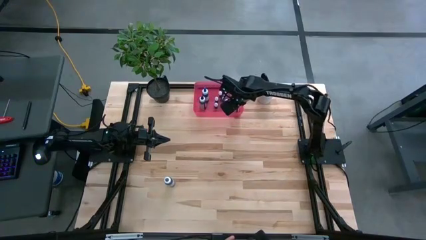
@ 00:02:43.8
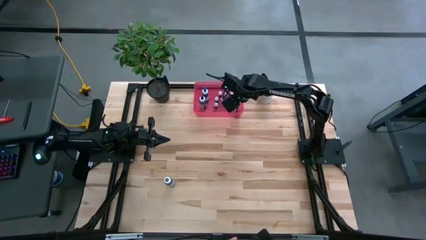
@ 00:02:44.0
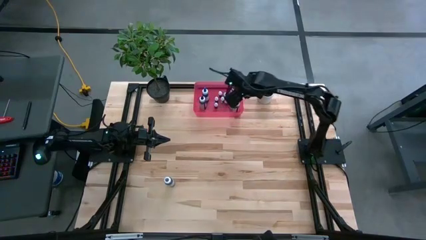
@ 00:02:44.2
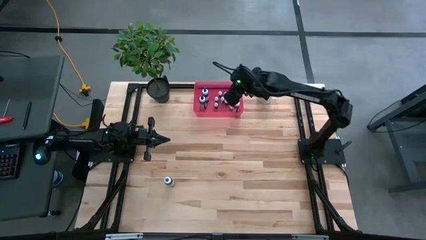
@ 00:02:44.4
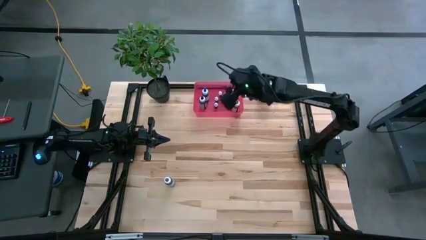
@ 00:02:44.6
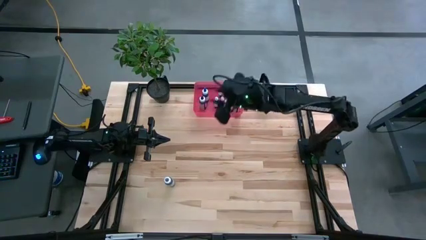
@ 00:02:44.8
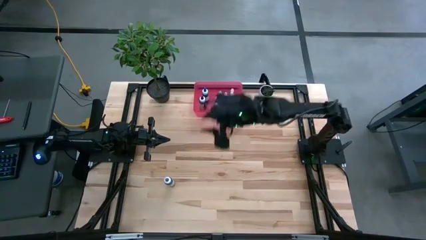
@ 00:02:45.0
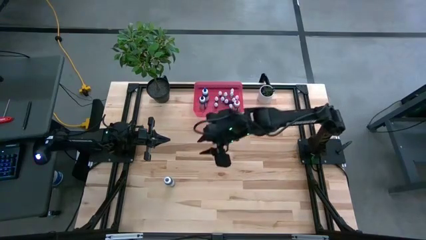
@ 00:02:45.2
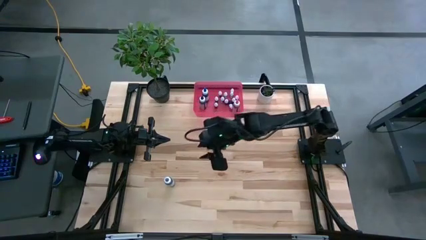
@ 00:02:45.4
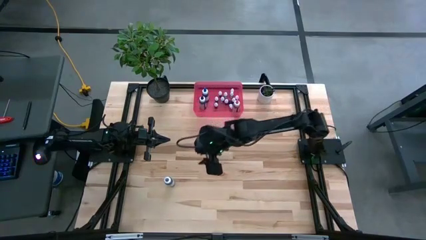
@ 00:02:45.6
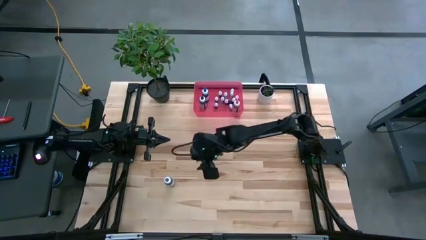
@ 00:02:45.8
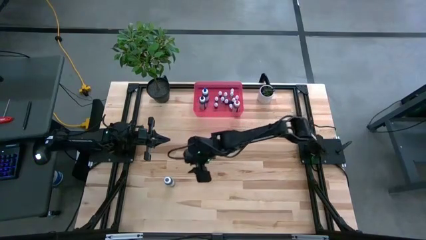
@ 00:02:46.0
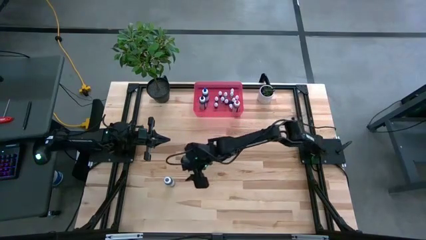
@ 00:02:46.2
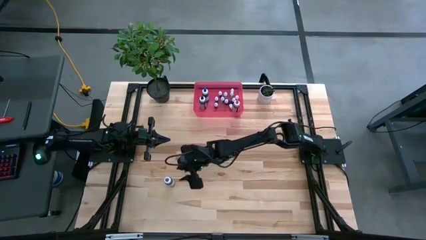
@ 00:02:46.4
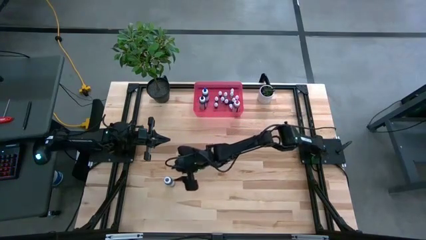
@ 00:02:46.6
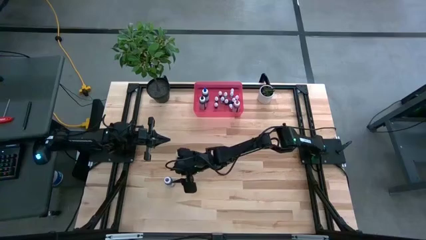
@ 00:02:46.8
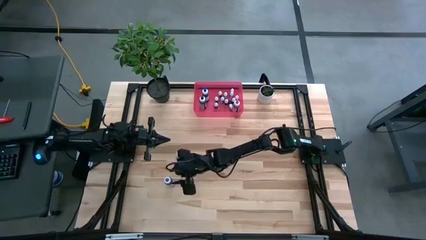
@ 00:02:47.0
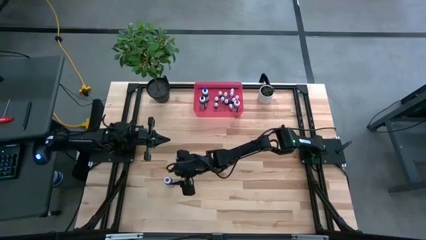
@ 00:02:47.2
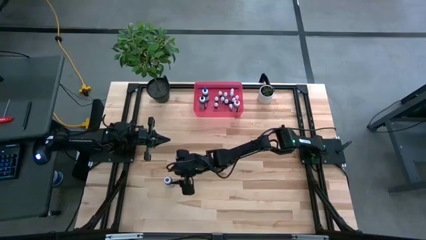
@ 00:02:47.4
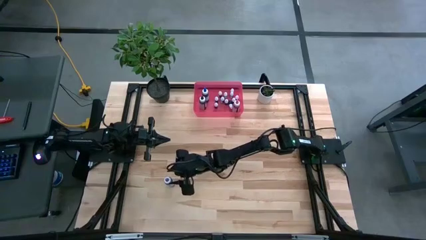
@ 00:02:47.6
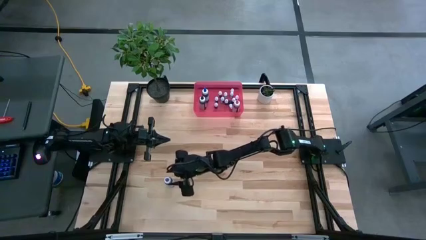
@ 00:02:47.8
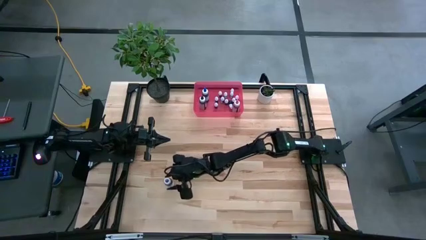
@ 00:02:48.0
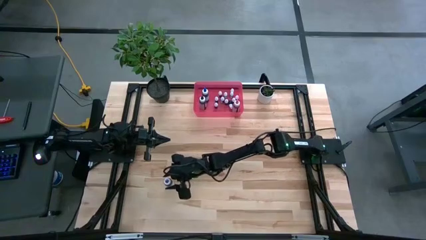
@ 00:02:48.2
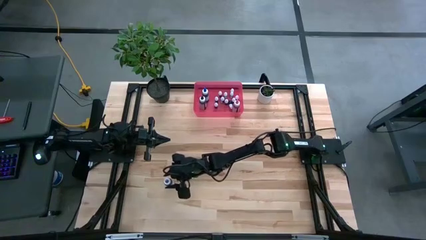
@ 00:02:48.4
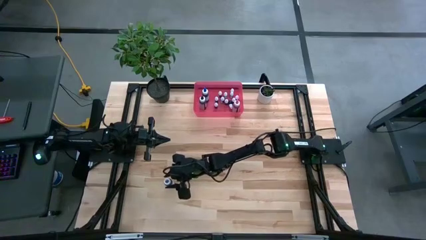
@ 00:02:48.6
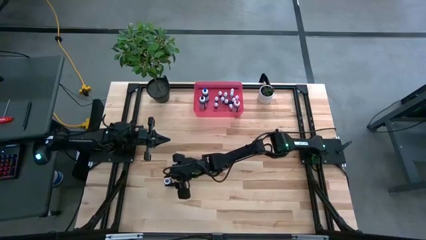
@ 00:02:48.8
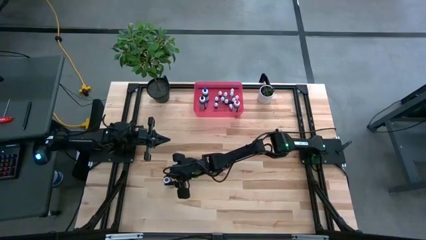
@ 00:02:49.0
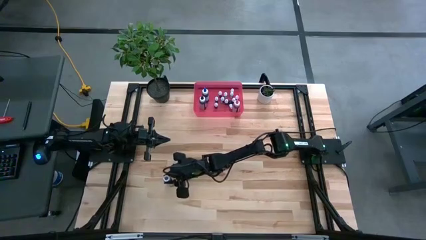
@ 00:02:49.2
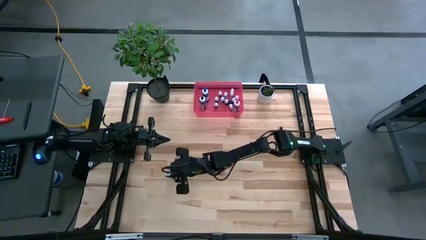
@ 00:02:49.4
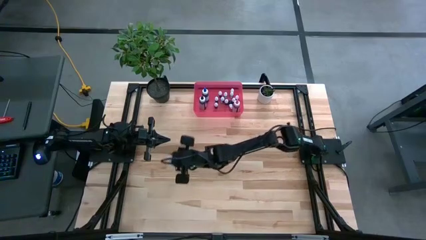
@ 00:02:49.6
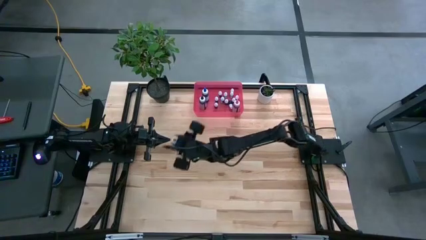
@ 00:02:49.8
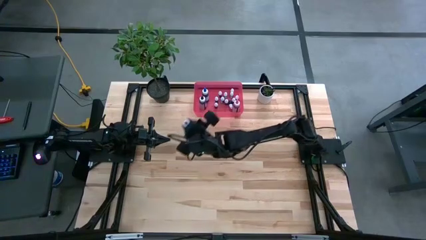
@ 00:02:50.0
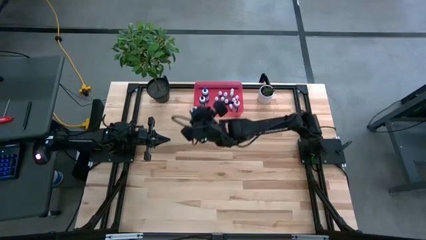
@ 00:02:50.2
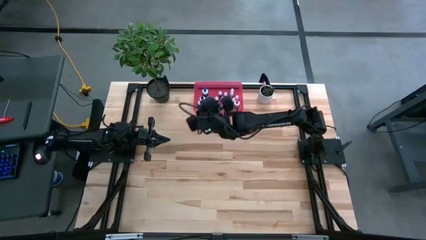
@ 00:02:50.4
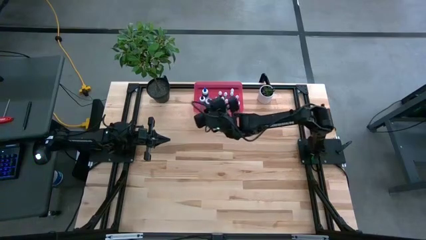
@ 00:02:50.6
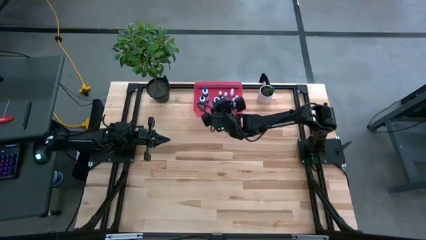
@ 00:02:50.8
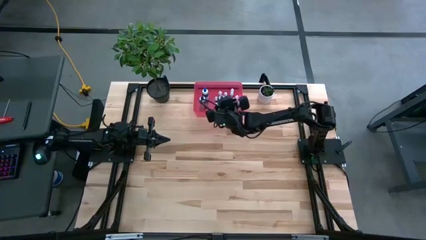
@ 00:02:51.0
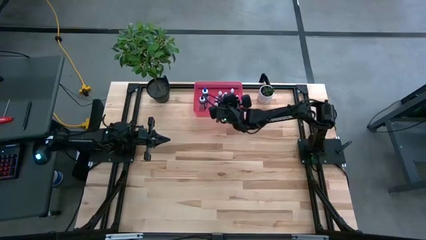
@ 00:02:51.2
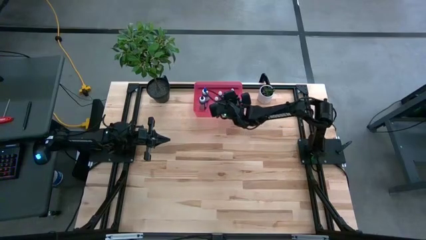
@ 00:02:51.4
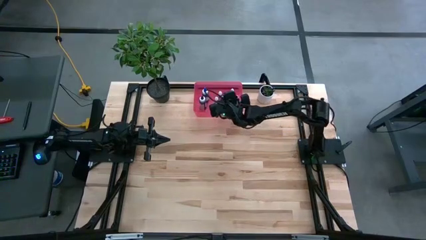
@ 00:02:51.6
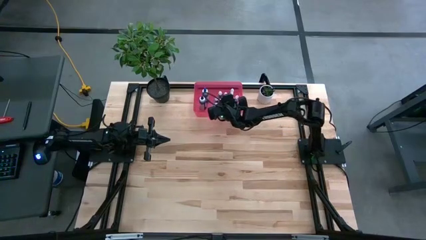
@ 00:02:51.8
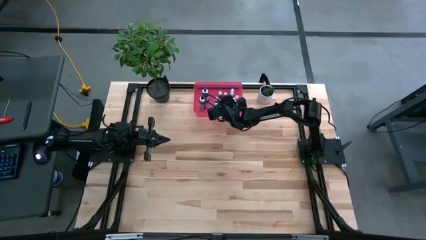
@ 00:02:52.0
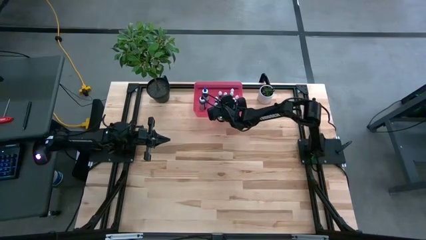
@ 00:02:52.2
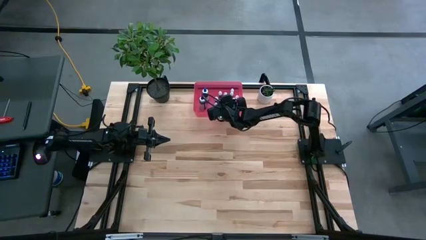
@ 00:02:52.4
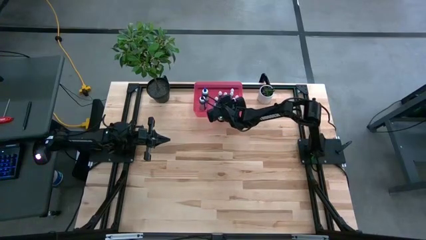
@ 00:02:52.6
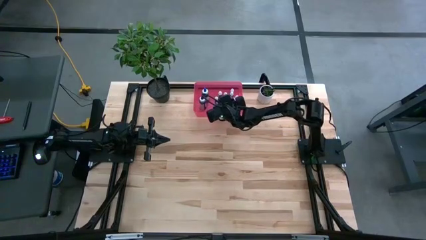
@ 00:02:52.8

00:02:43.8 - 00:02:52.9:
Task: Pick & Place food coloring
Put the large violet food coloring bottle into the red bin

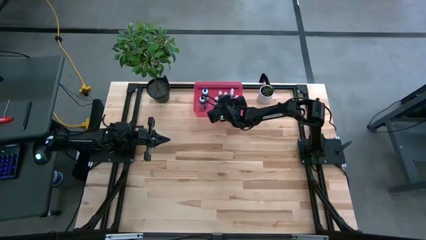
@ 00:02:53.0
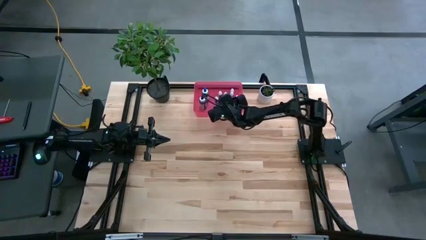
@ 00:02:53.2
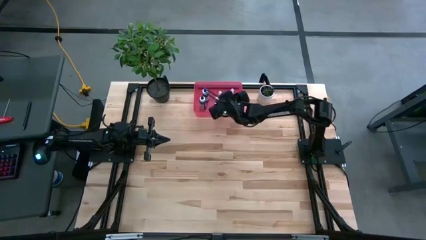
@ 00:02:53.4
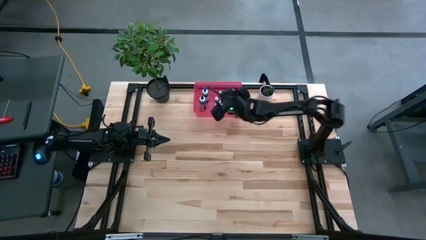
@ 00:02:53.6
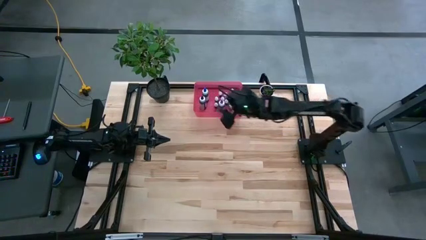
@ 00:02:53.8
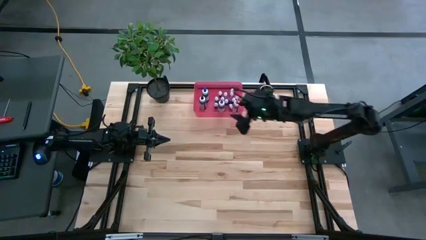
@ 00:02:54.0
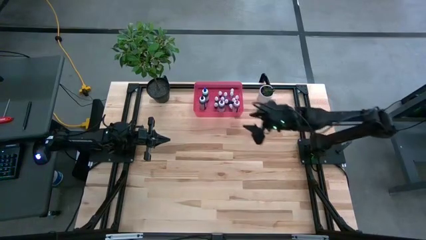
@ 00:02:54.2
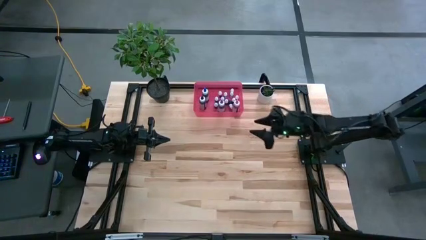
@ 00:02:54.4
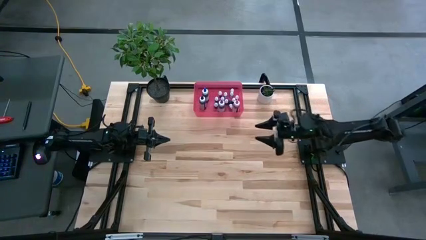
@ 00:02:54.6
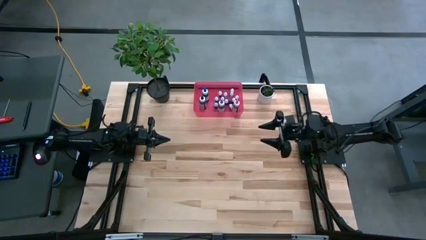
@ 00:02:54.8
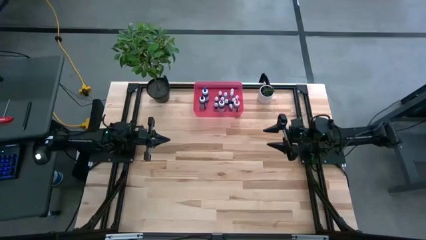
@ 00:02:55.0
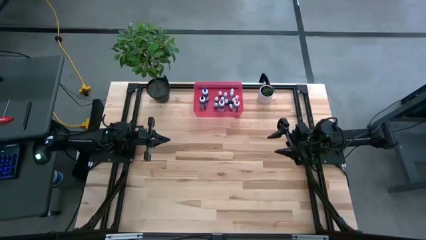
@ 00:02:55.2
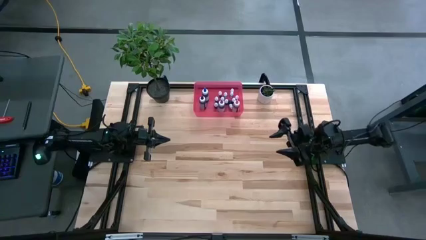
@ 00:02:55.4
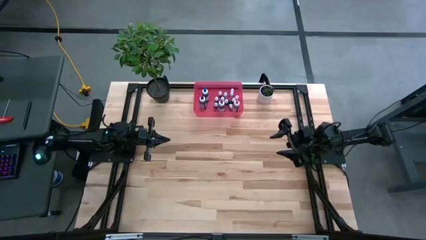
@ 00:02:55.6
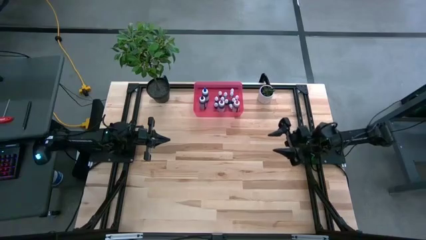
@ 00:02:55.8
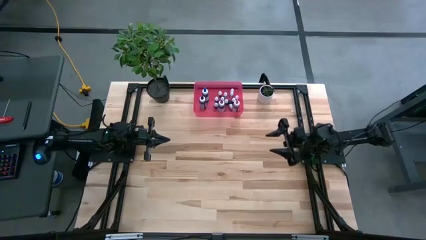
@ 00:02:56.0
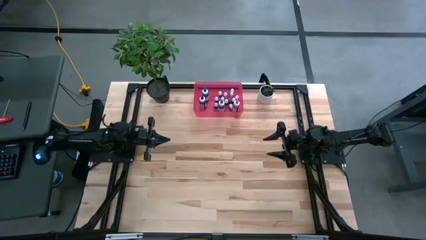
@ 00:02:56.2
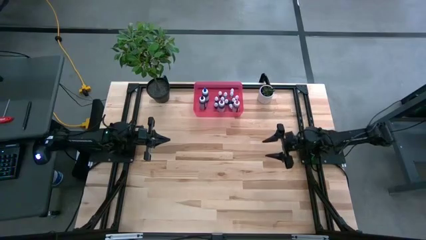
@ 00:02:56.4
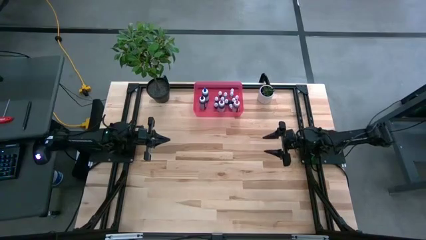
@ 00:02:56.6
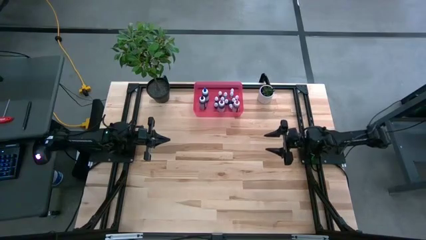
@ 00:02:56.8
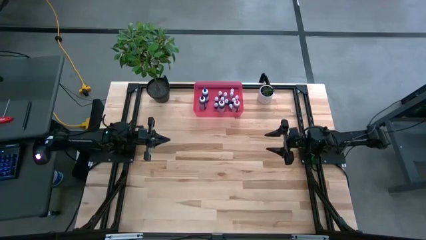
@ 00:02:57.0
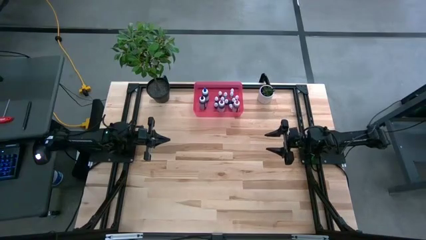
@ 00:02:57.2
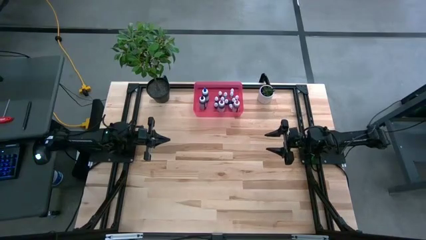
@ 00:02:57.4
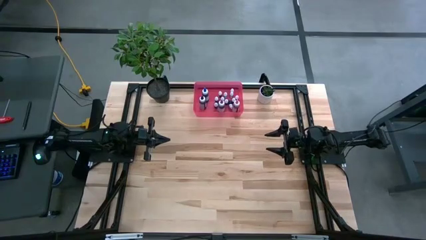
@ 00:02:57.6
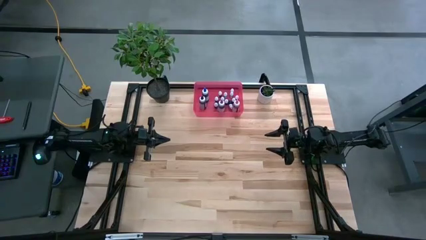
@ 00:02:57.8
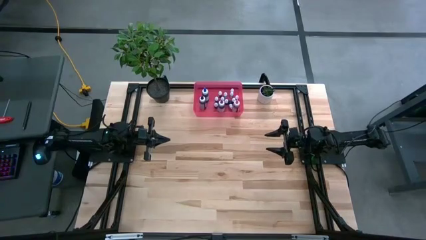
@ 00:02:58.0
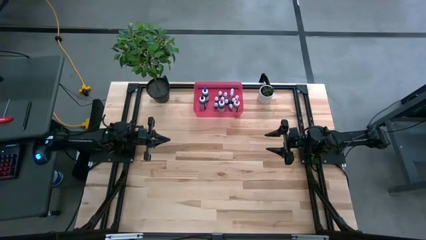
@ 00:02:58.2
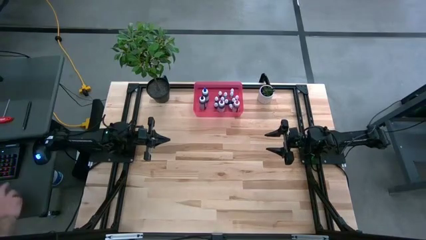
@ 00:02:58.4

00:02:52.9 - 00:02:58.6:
Return to Home Position

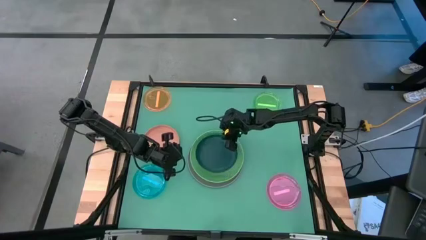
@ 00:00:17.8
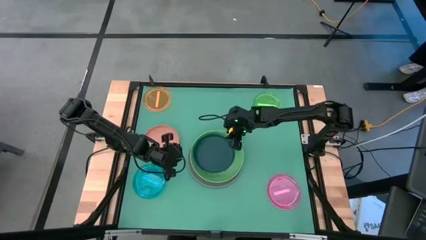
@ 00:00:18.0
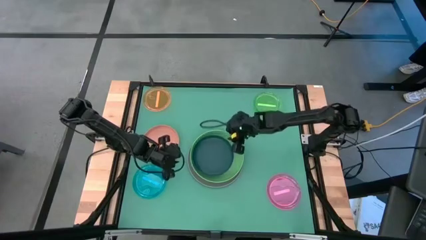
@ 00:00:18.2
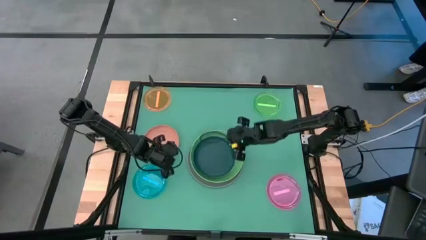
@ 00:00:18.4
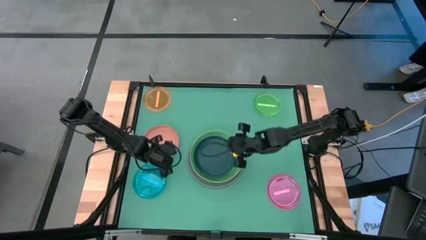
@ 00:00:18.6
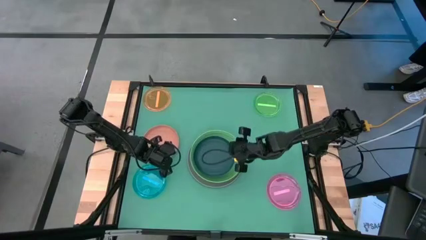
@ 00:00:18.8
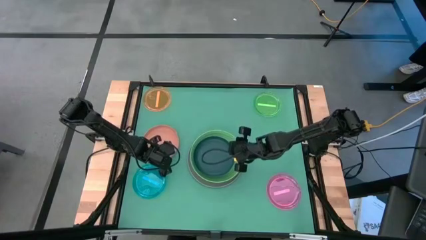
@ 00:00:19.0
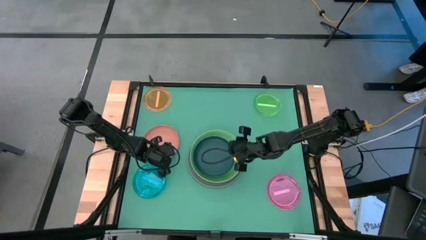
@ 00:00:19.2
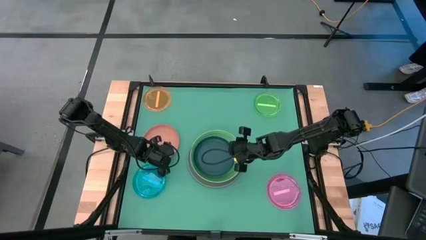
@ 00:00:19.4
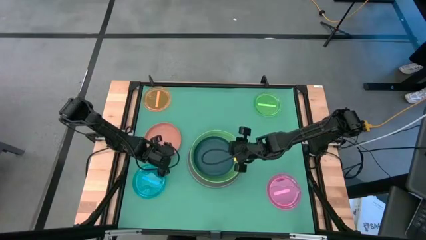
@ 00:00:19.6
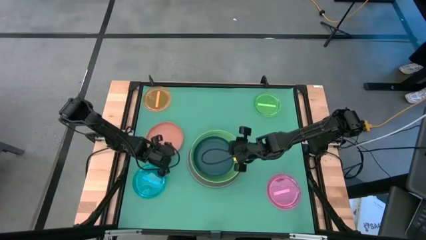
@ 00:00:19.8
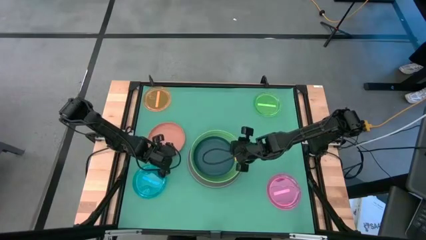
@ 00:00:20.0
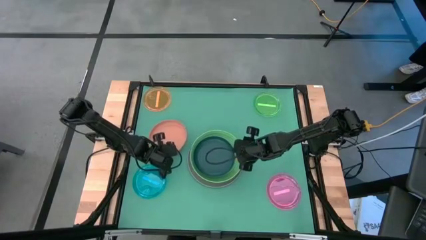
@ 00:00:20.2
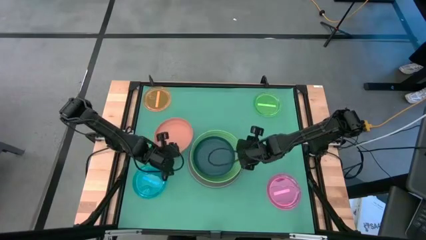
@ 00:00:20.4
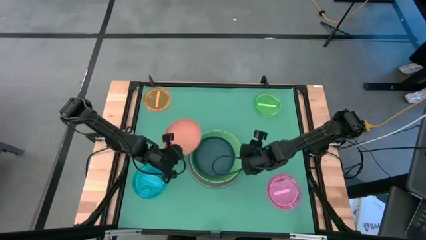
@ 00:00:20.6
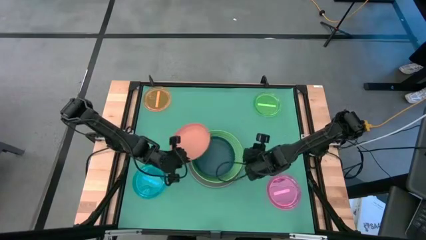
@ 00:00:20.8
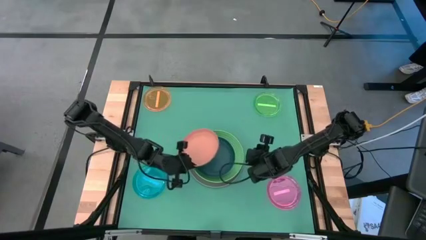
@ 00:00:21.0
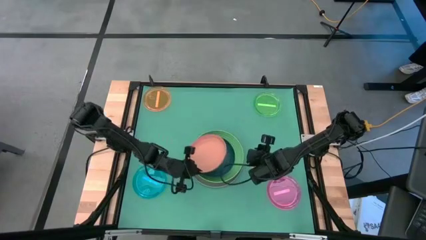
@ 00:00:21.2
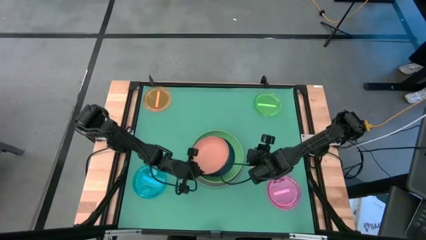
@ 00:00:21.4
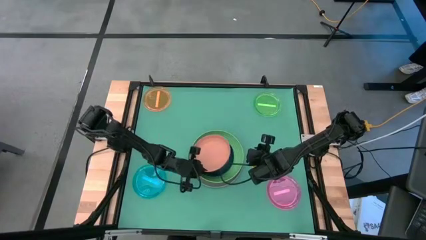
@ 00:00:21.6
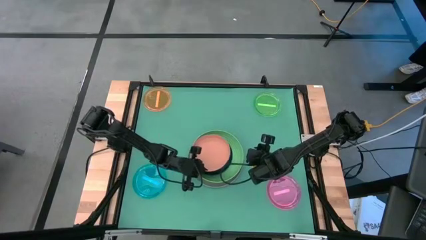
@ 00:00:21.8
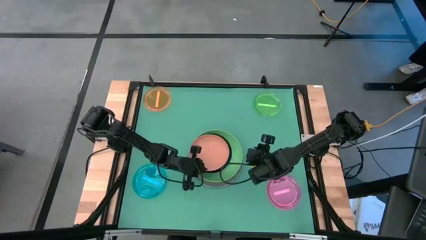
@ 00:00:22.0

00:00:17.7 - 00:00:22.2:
Task: Stack plastic plates
Stack the orange plate on the dark green plate
